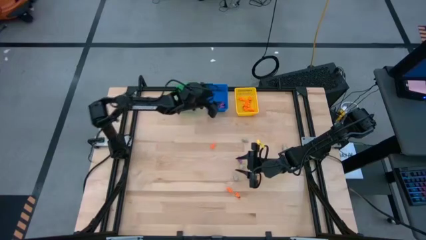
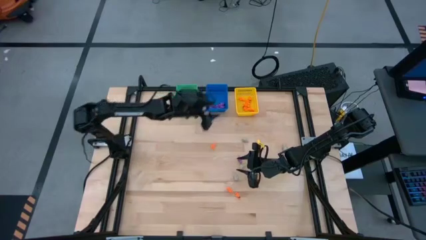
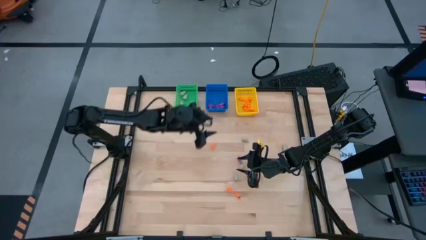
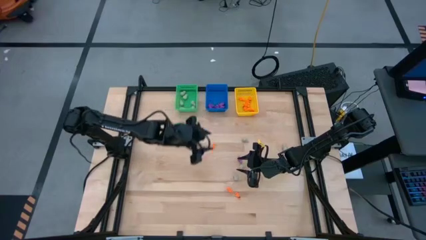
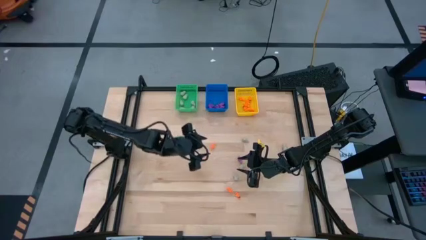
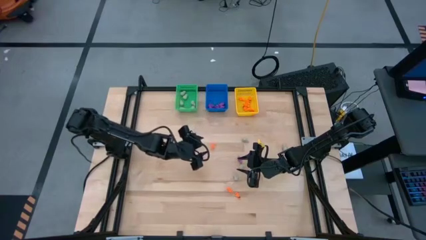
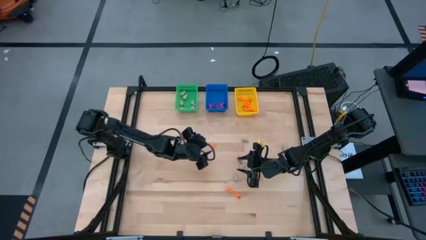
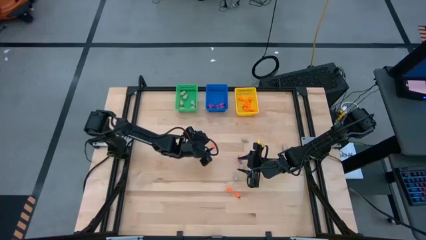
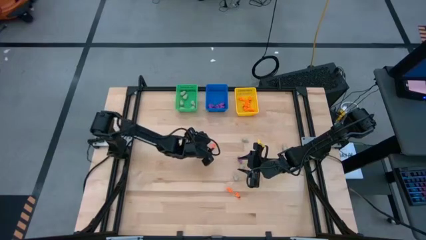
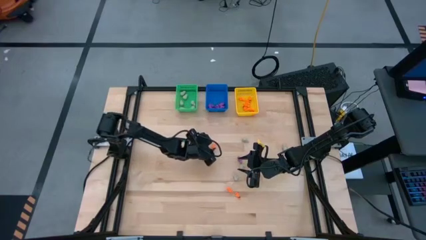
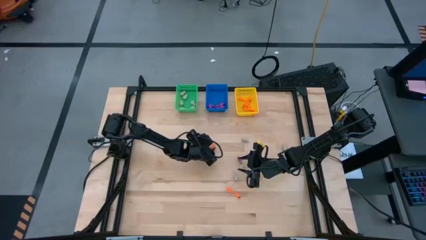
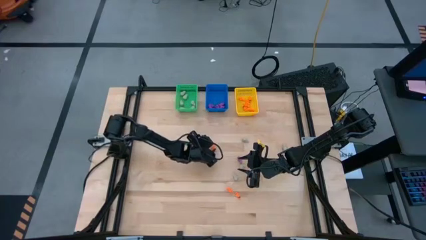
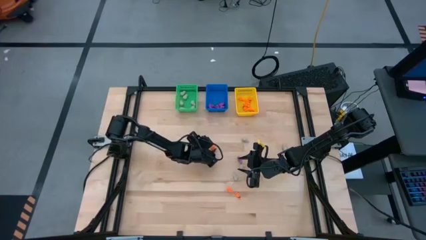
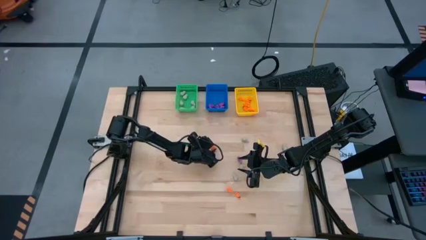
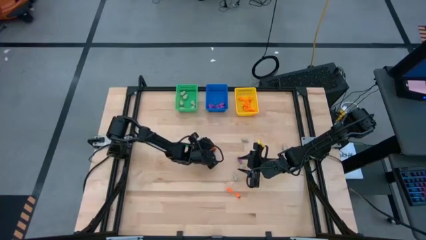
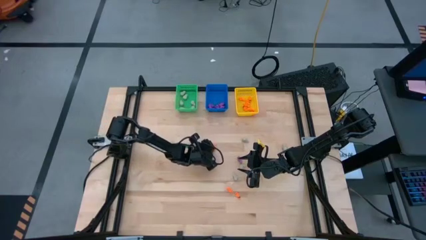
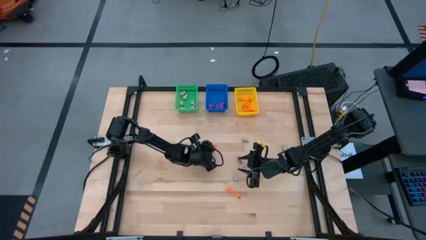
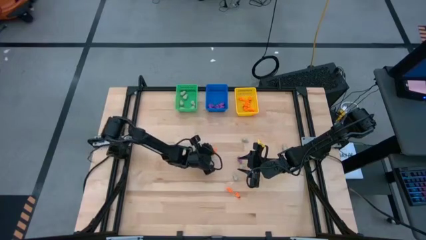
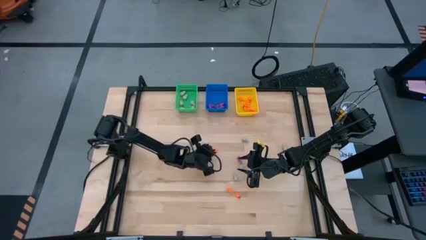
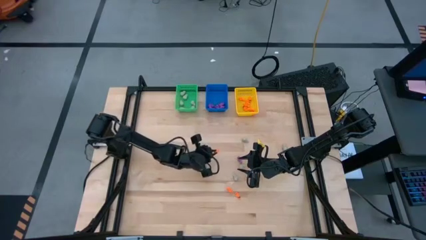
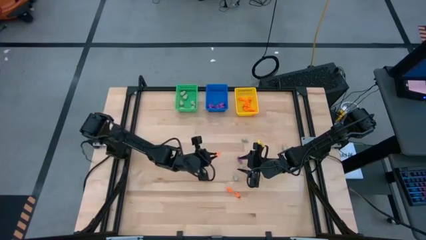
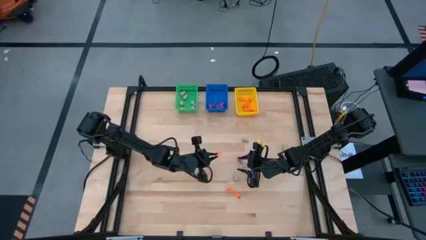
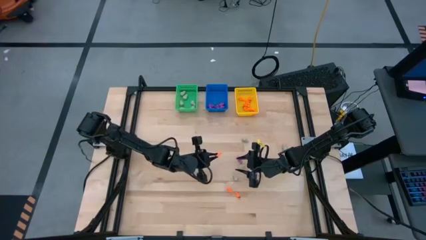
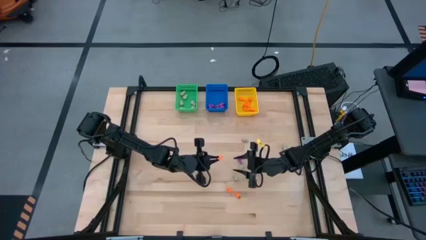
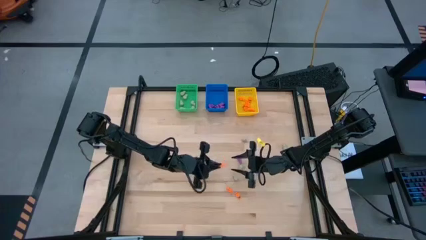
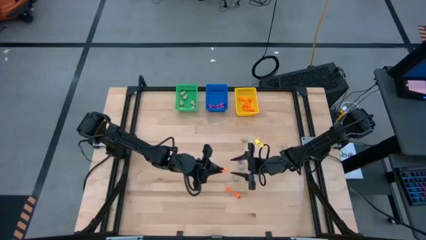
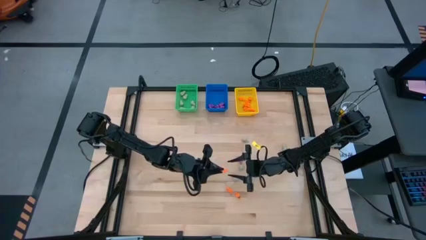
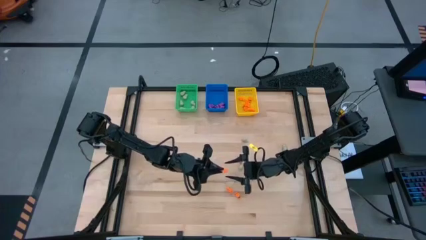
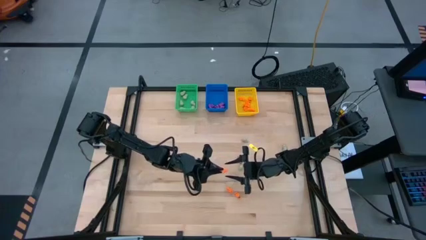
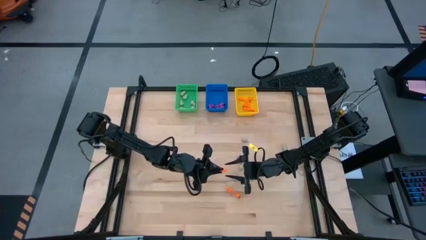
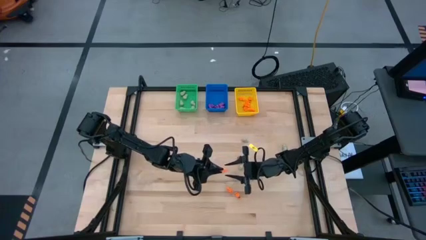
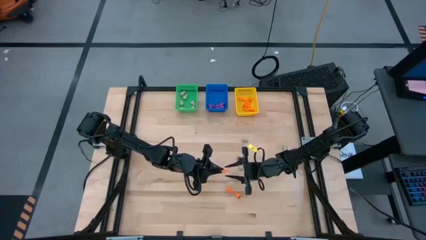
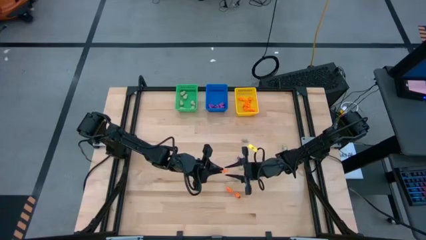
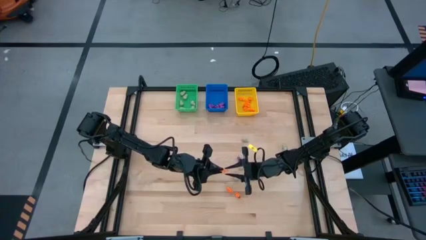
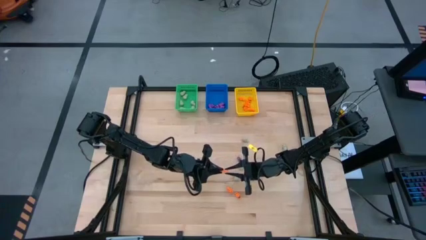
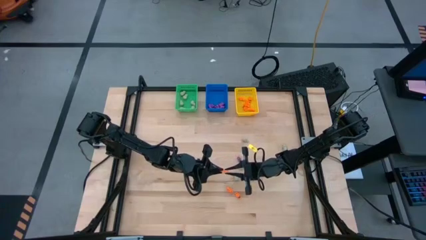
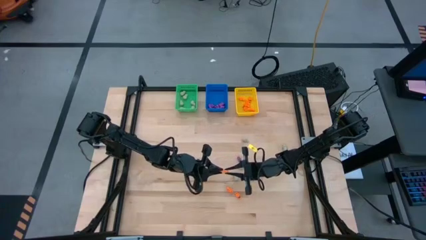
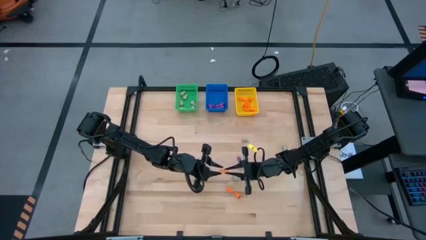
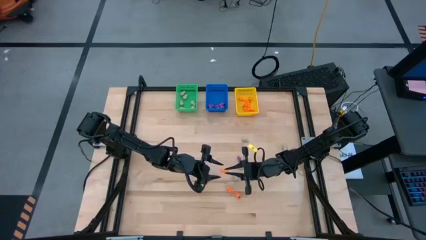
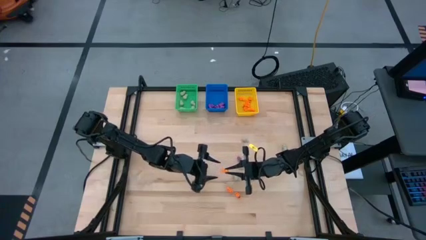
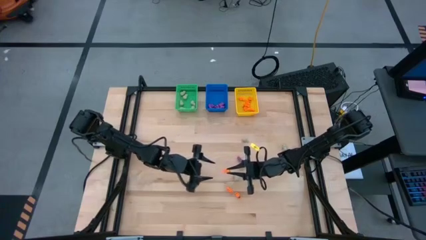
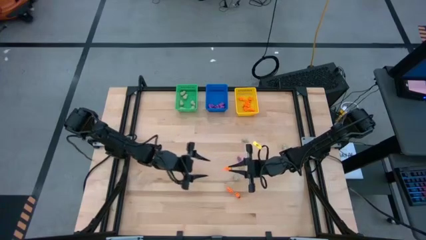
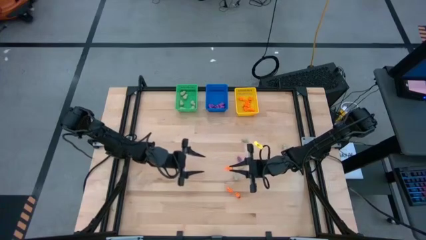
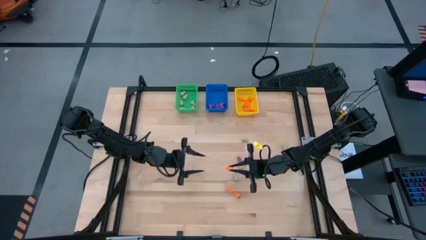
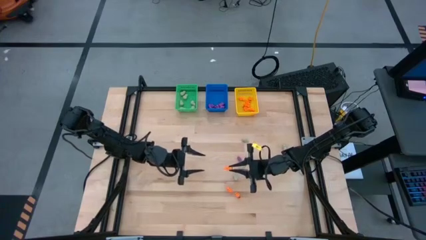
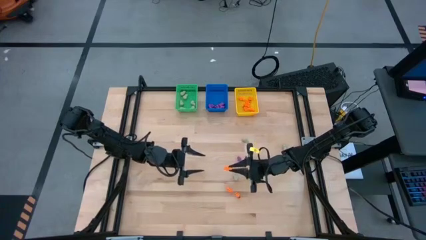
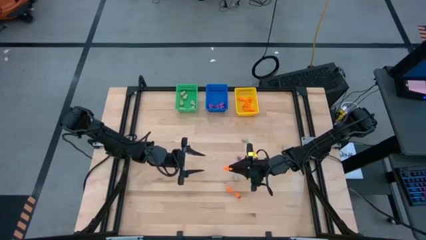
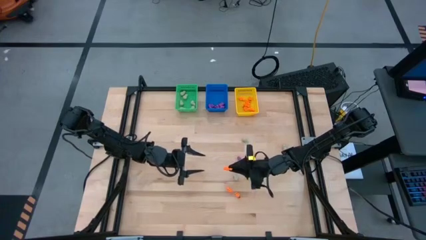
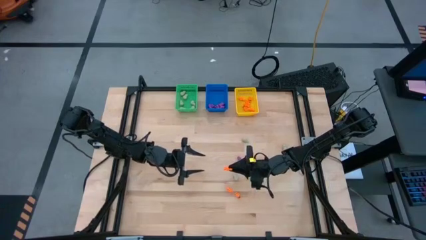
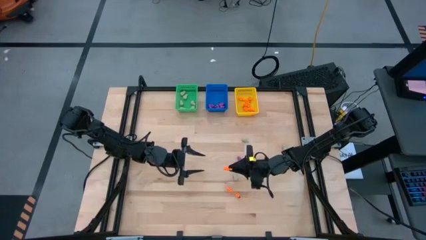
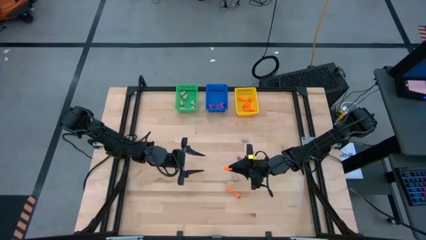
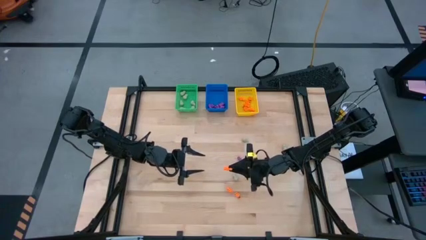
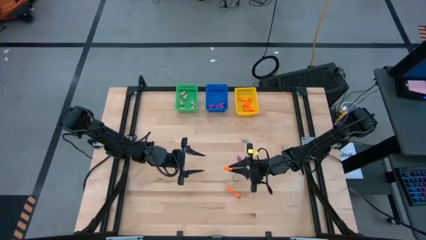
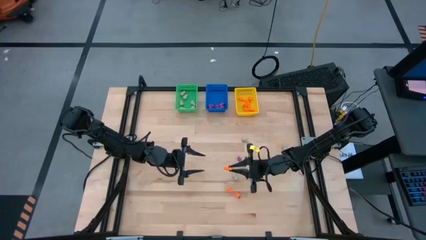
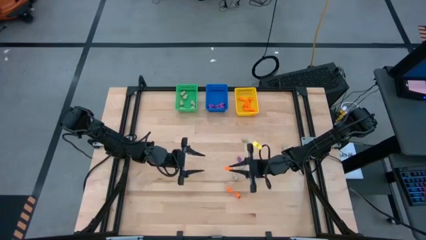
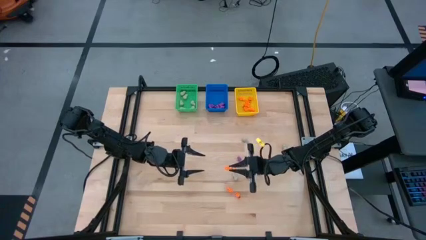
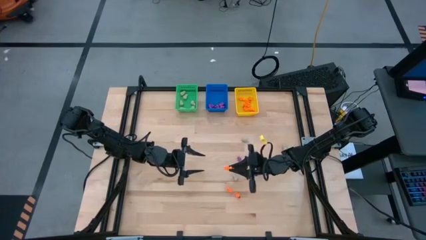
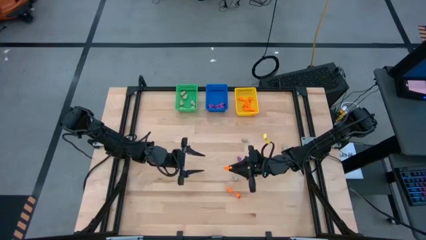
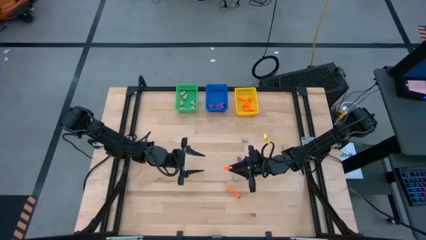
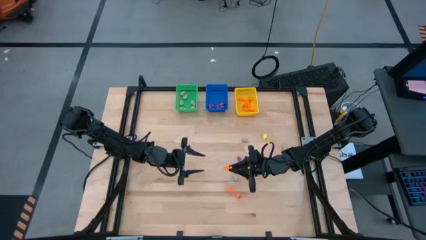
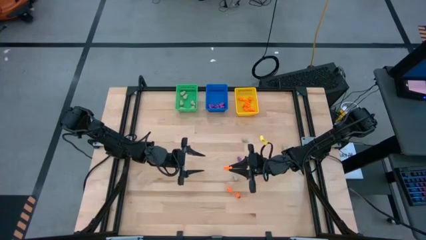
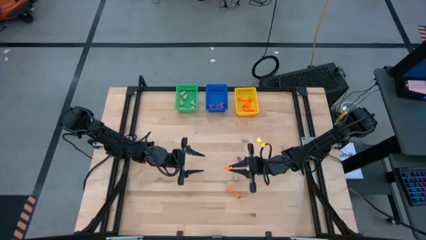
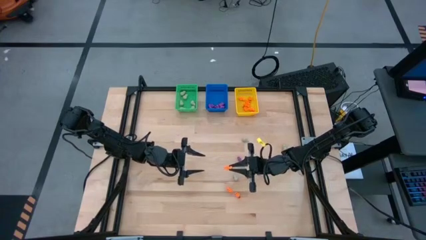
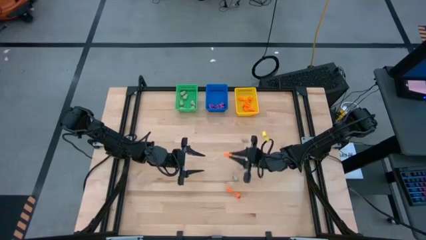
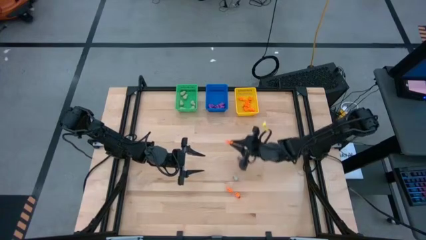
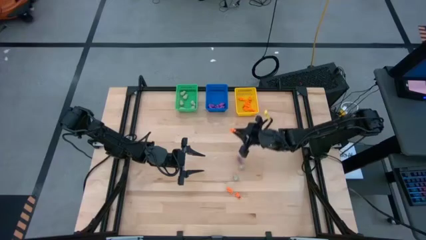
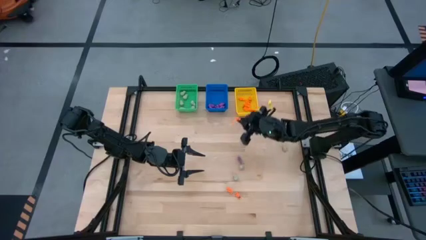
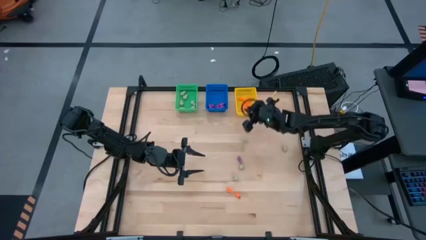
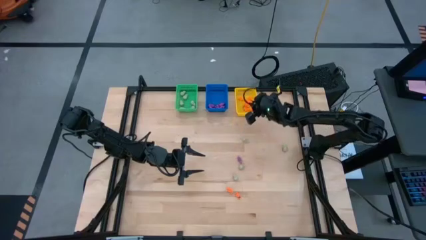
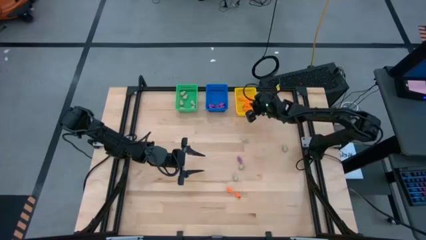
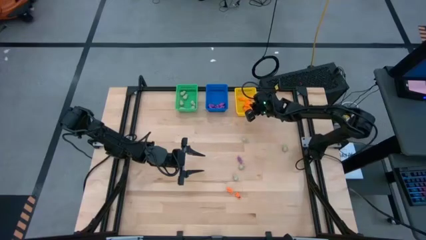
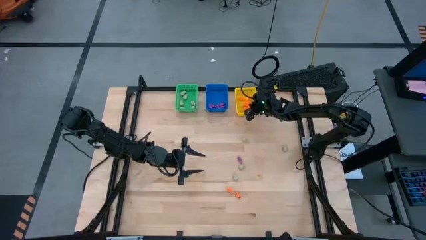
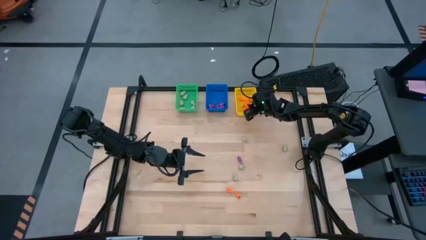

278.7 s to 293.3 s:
Task: Sort Halloween decoration
Put the orange skeleton toy into the yellow bin

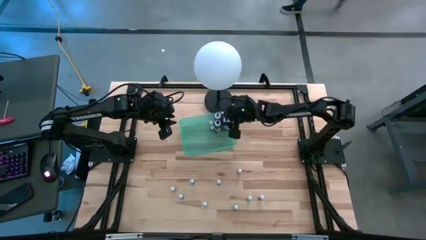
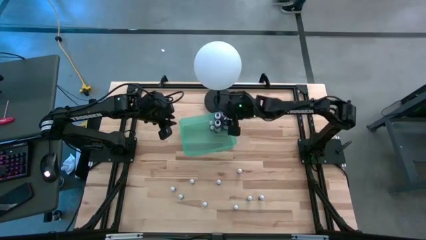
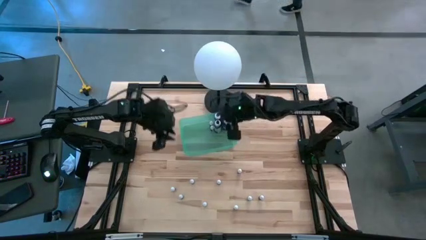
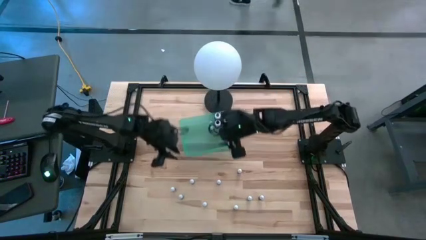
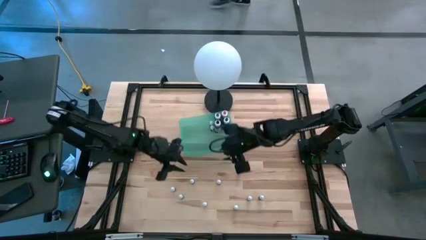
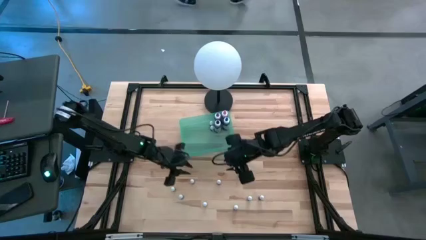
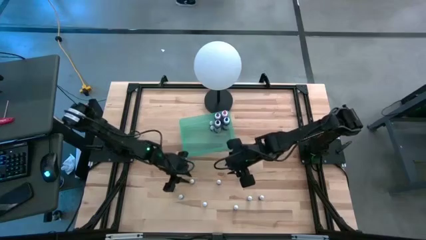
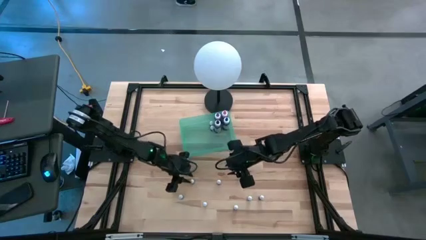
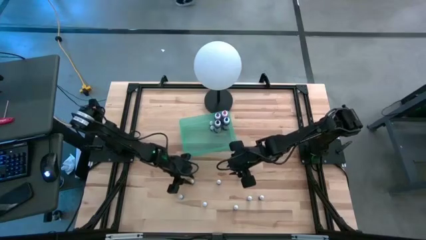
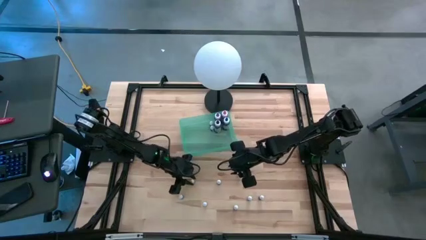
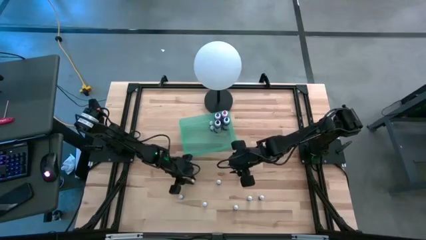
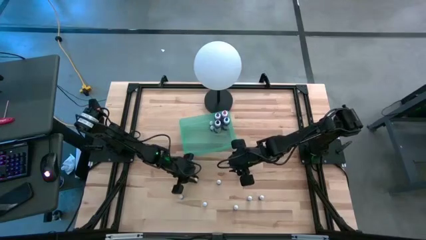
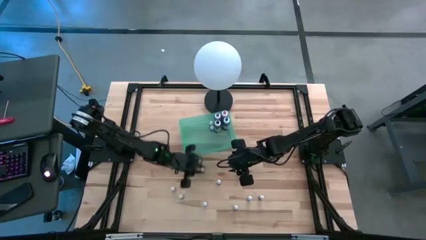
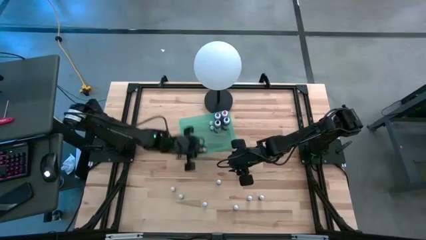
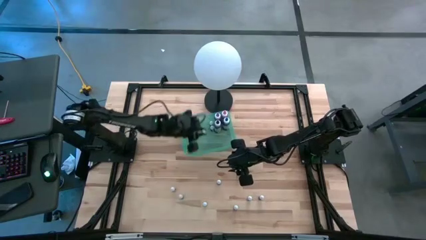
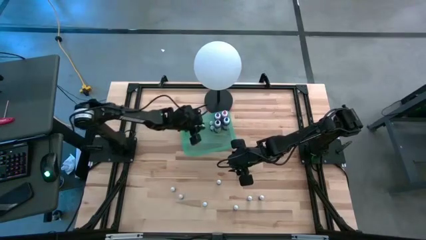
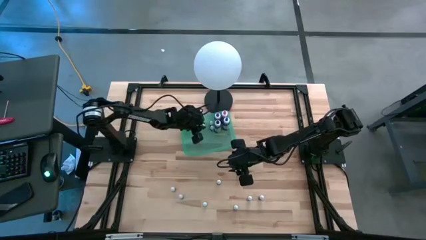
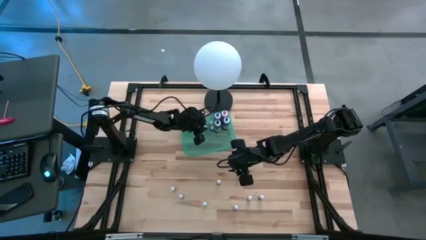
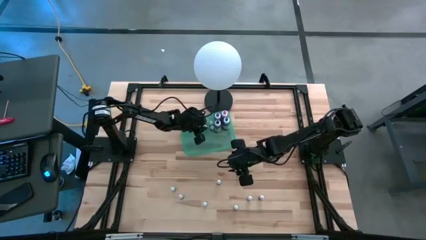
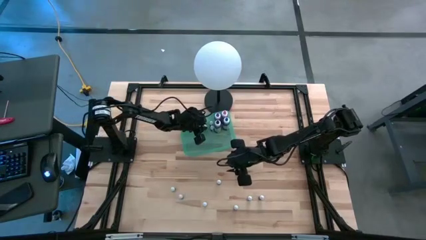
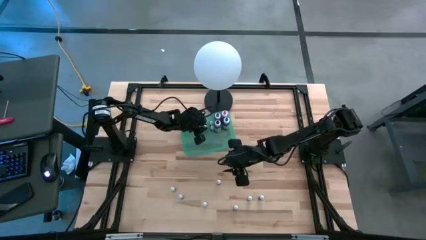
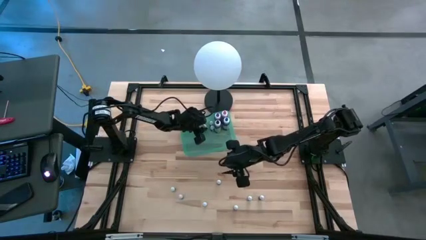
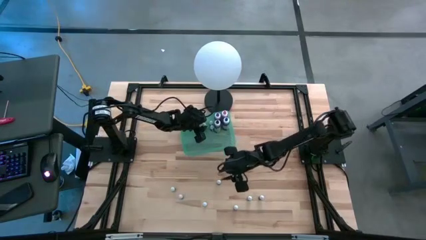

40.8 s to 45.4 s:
Task: Pick & Place food coloring
Put the green food coloring bottle into the green bin
